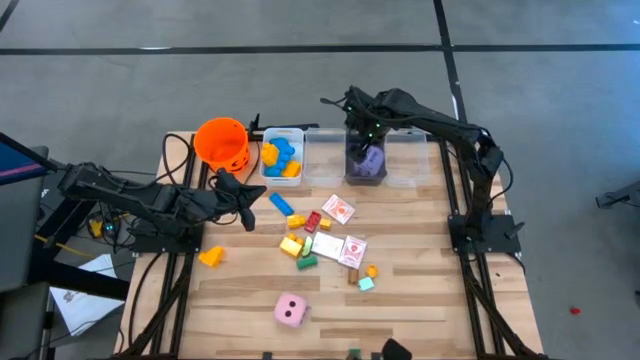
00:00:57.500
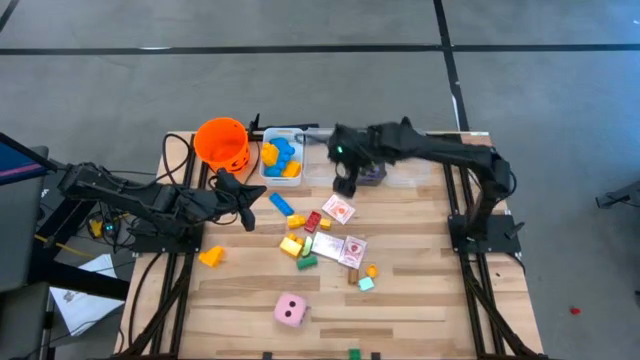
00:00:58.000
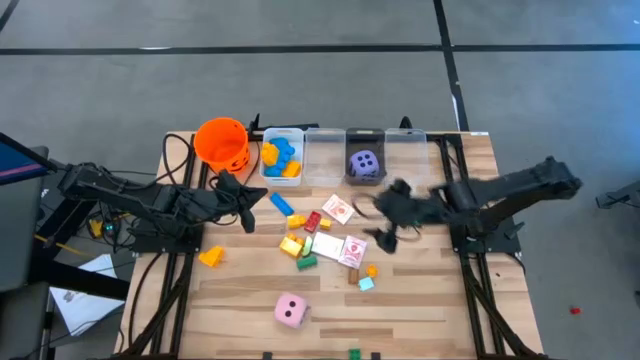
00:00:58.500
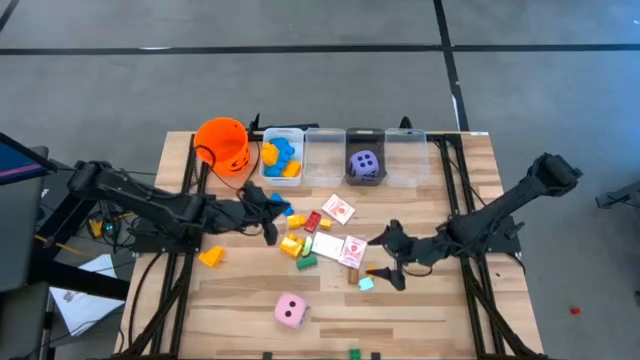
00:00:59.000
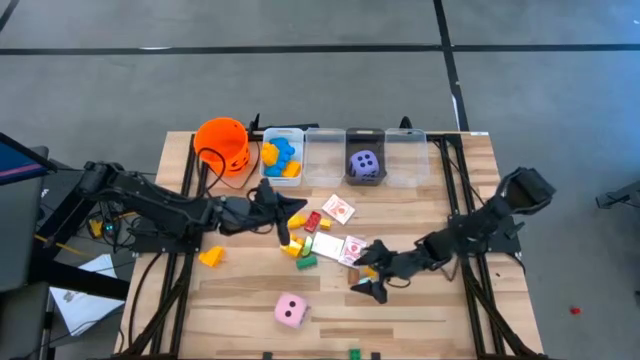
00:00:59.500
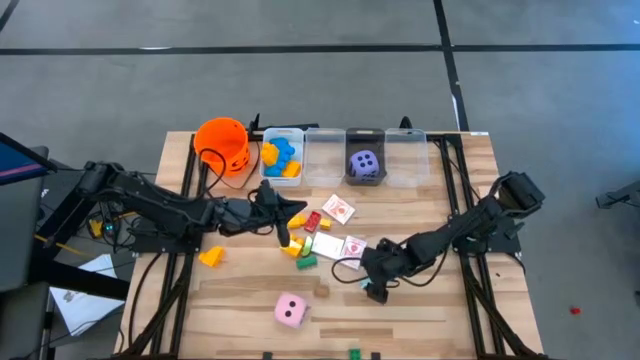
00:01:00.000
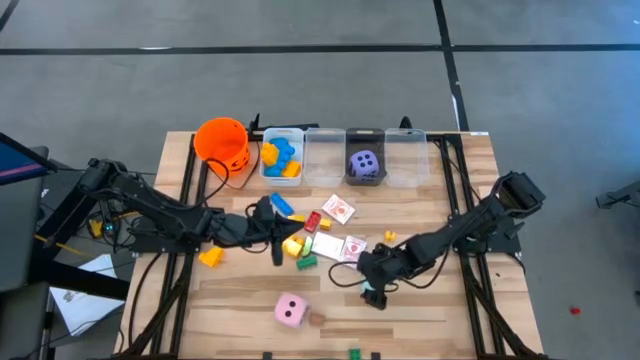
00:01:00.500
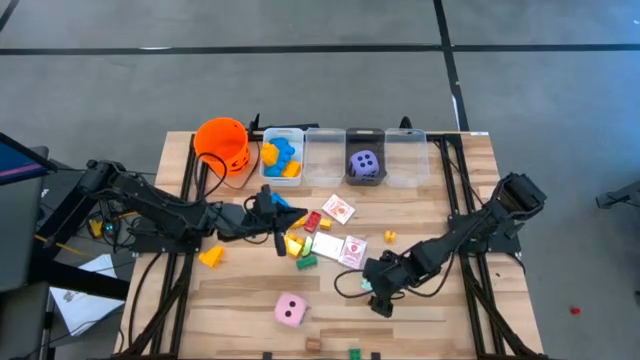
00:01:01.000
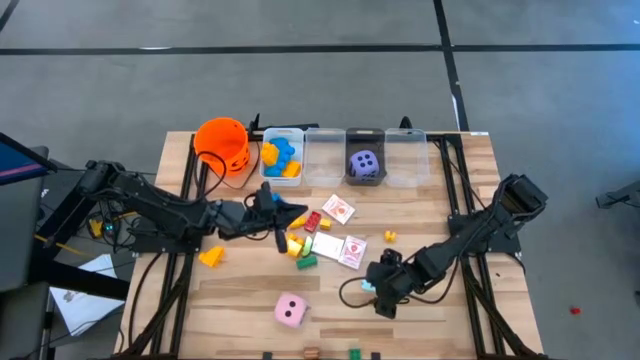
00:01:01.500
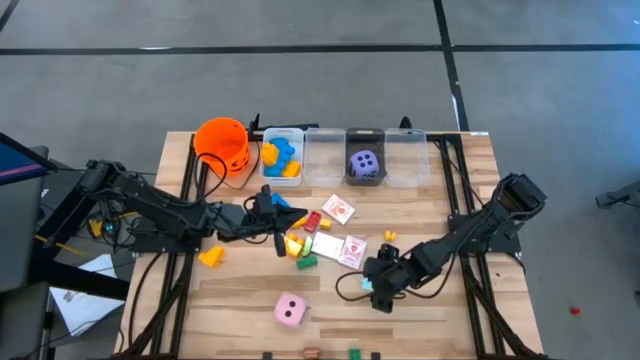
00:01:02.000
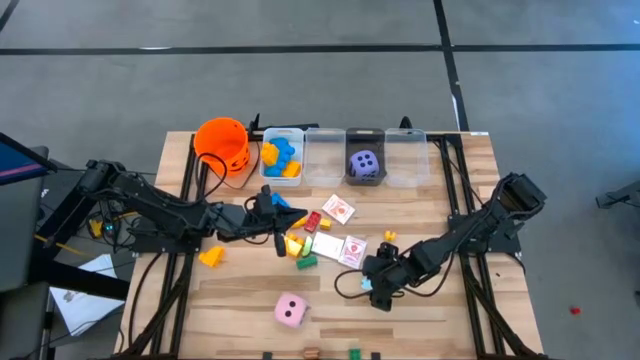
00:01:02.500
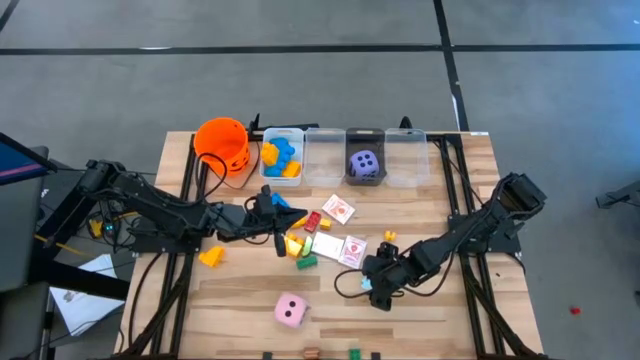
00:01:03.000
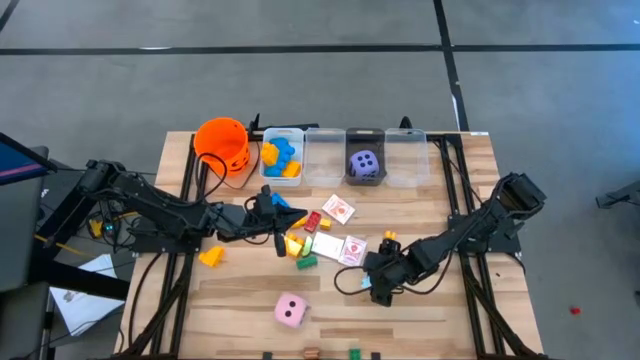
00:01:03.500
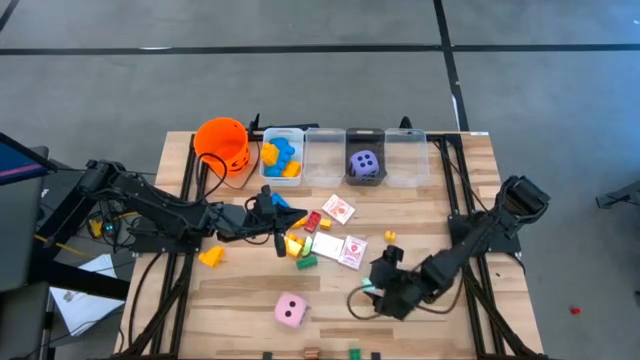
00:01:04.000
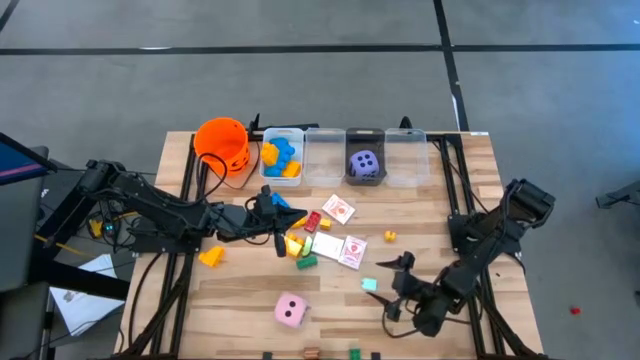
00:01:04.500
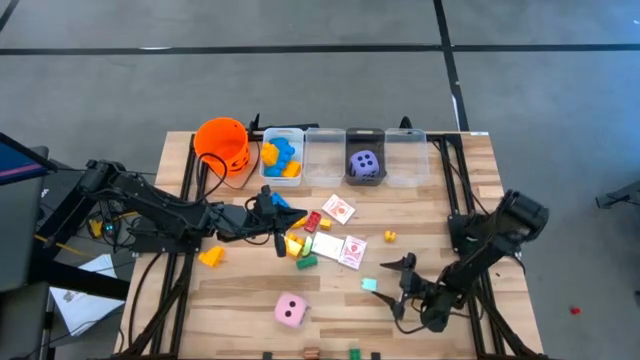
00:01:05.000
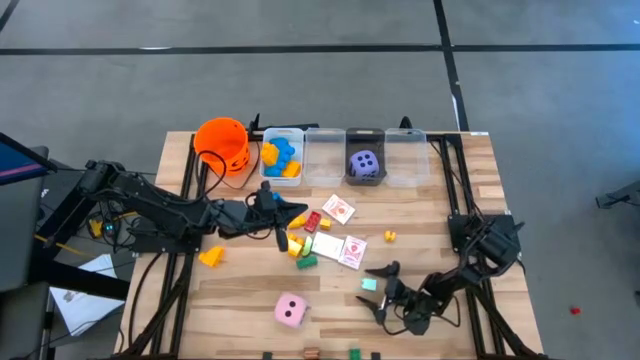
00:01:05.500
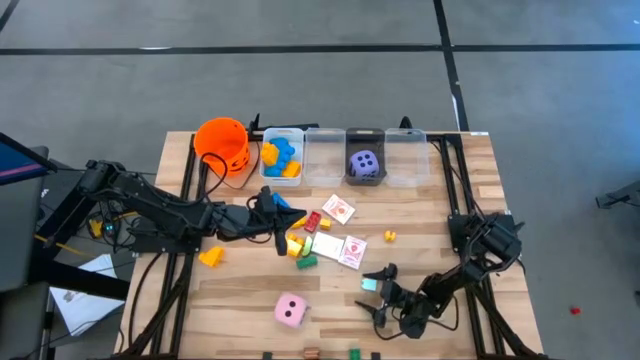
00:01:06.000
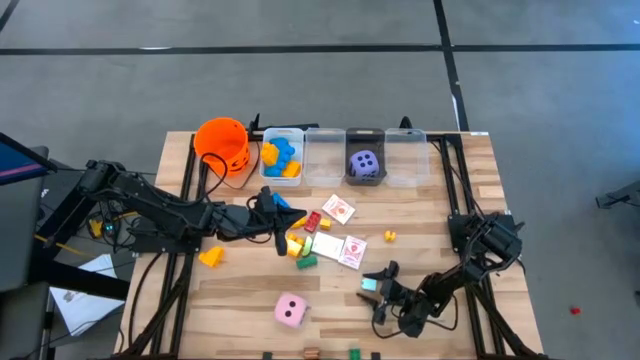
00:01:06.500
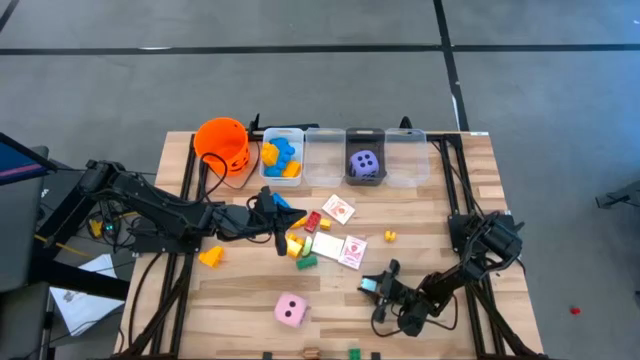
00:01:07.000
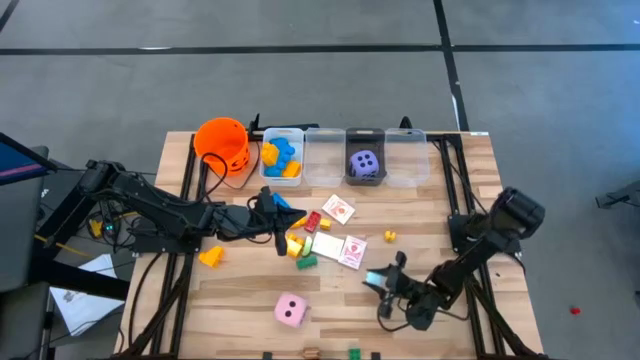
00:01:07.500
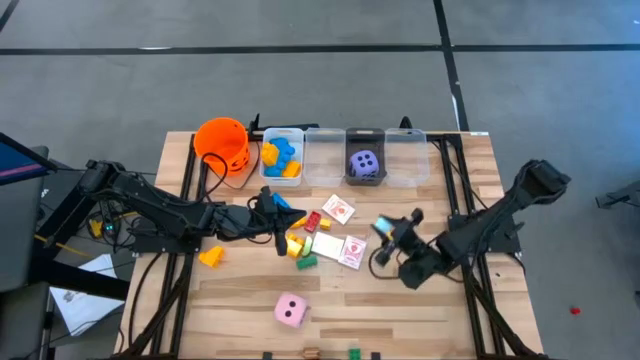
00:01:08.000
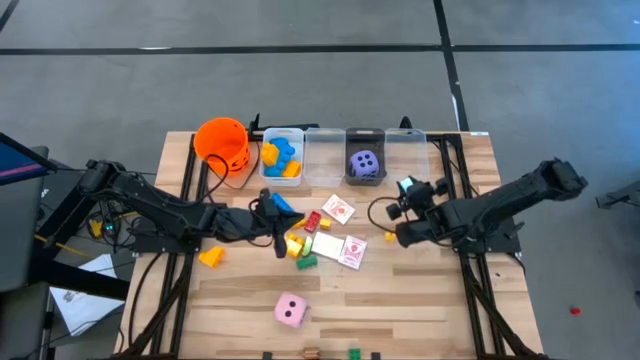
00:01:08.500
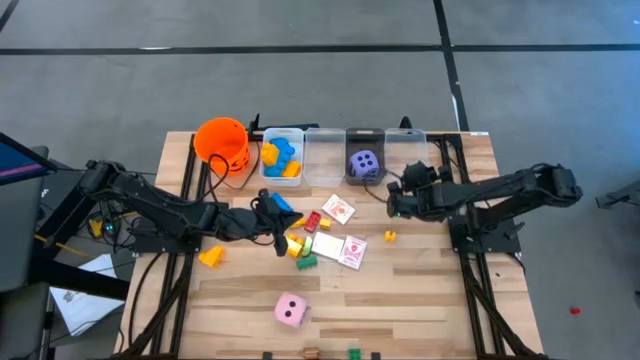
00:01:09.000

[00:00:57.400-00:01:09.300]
Task: Pick & Place Toys
Put the light blue game piece into the right transparent bin

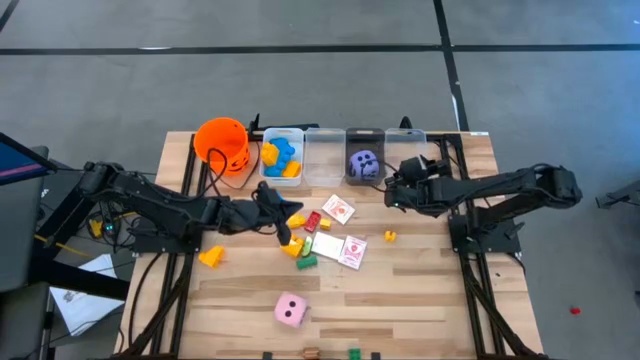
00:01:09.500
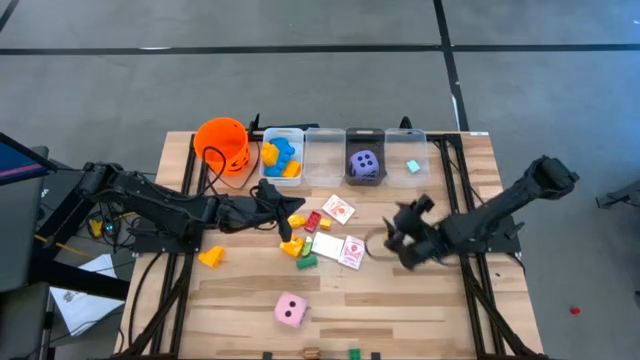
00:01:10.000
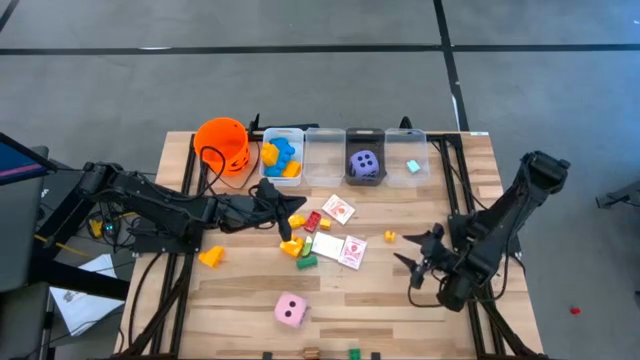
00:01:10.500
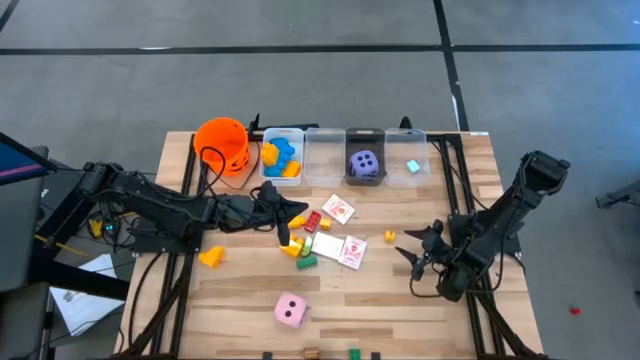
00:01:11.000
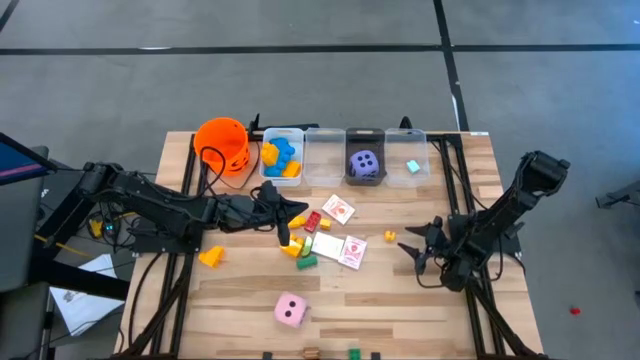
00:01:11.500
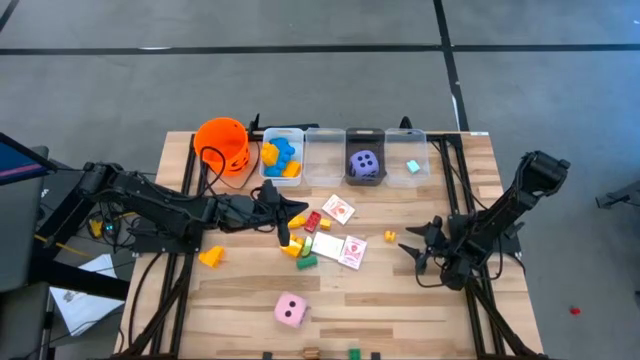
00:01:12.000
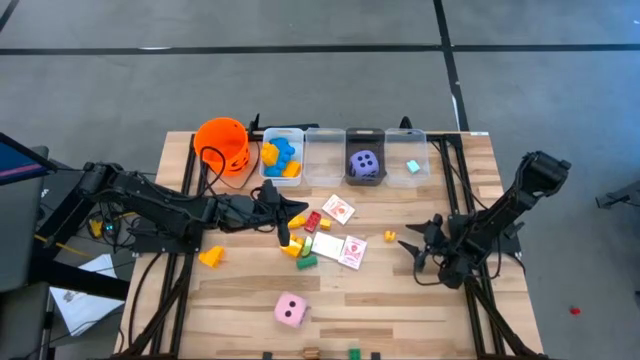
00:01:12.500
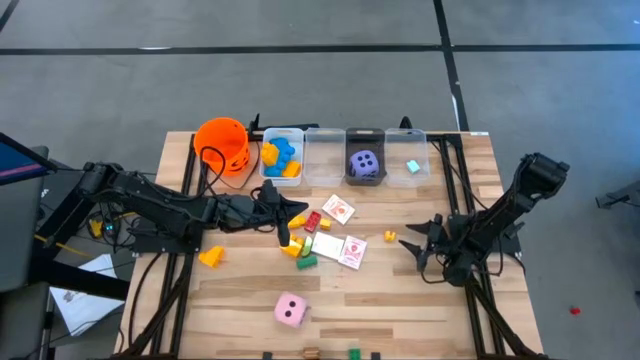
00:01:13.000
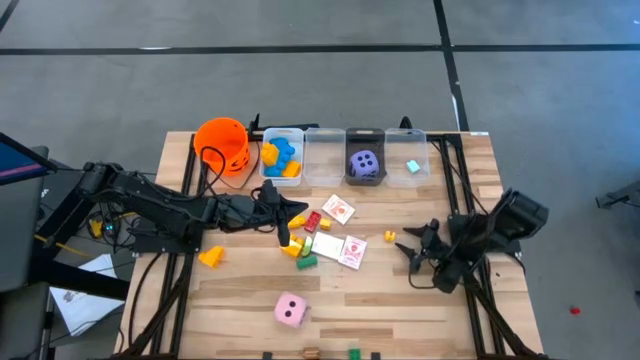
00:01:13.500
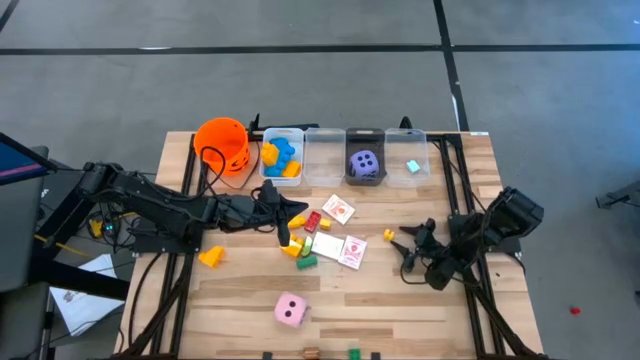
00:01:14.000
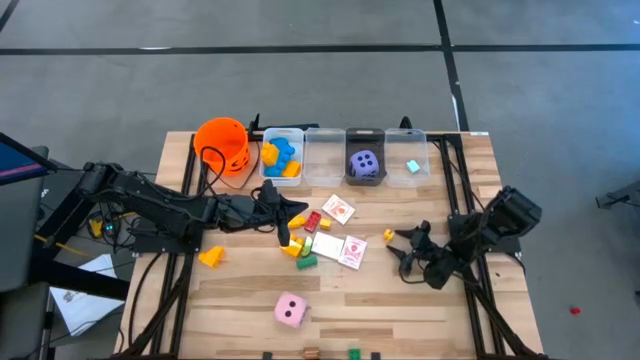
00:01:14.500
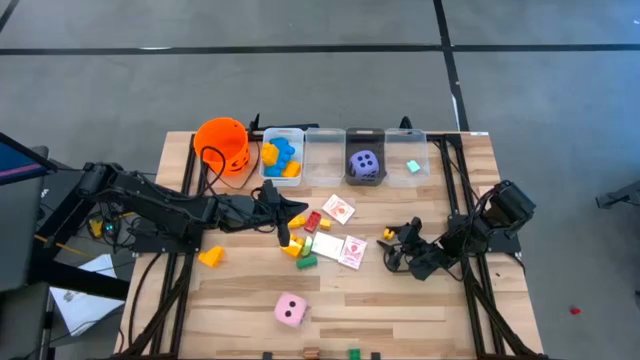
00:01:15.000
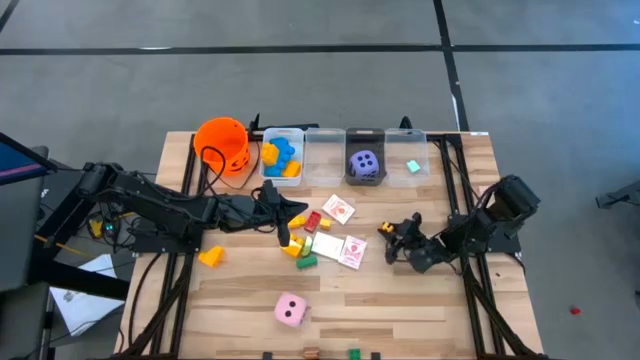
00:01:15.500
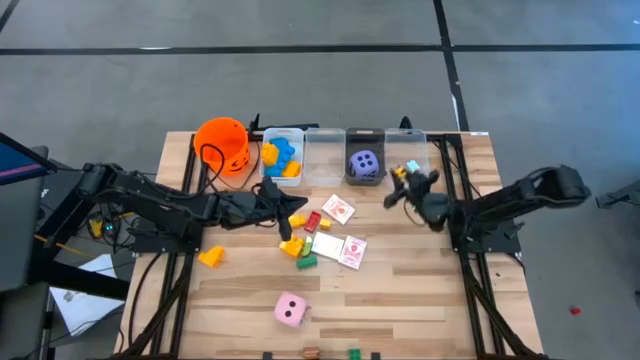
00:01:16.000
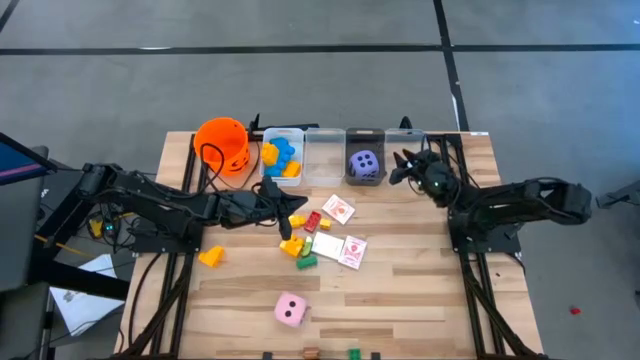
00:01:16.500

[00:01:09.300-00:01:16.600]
Put the right small yellow game piece into the right transparent bin

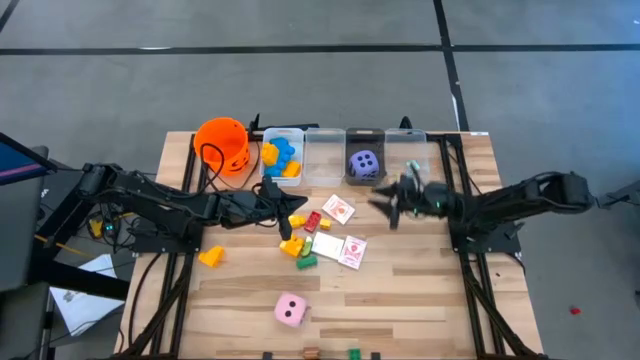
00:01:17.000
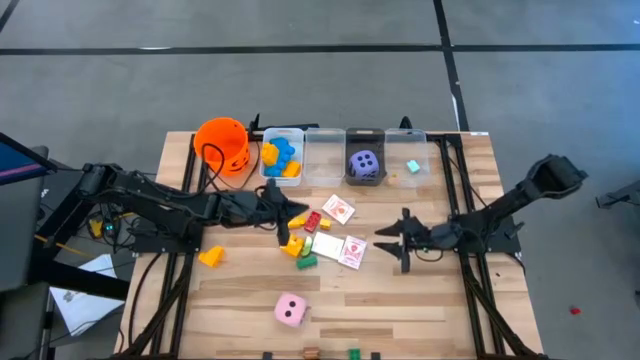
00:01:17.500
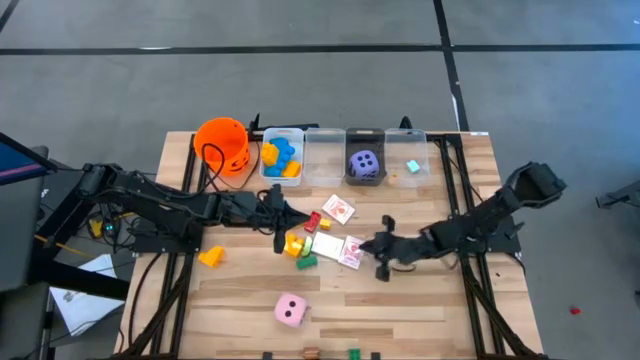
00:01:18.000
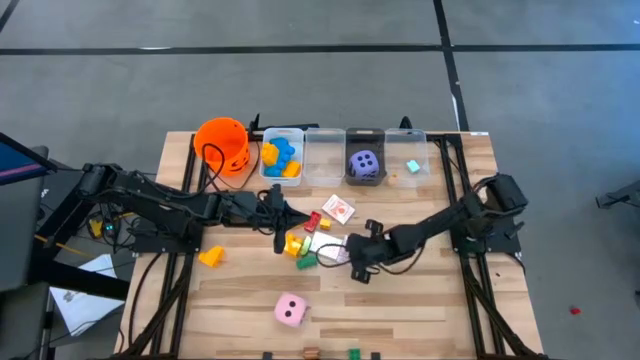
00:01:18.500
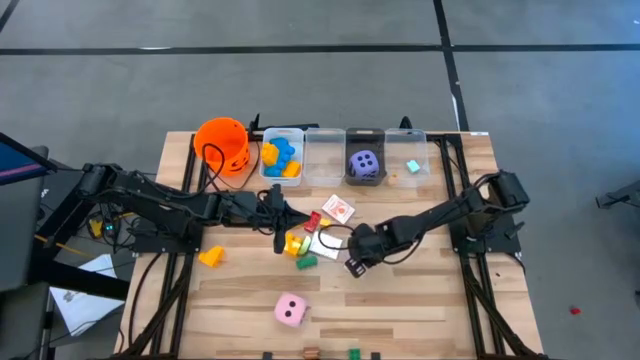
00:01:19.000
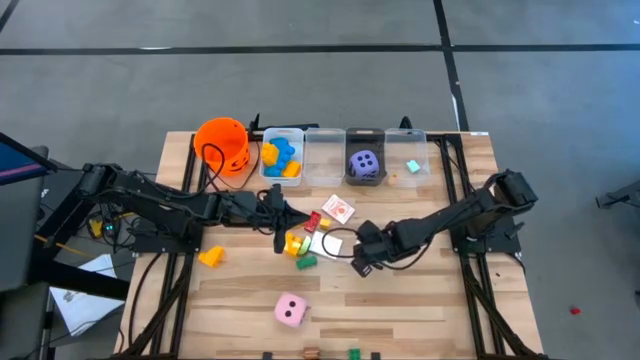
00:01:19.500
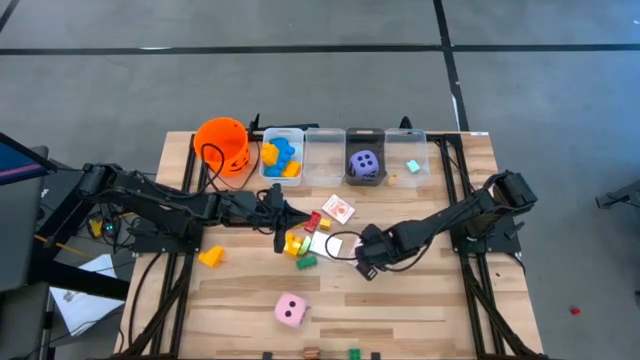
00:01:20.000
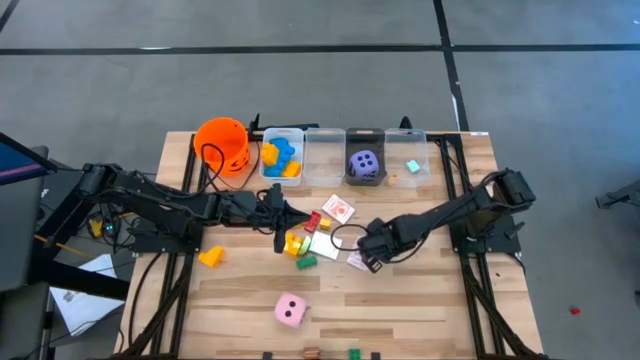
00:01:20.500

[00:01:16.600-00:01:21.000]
Adjust the red deck of cards on the table
